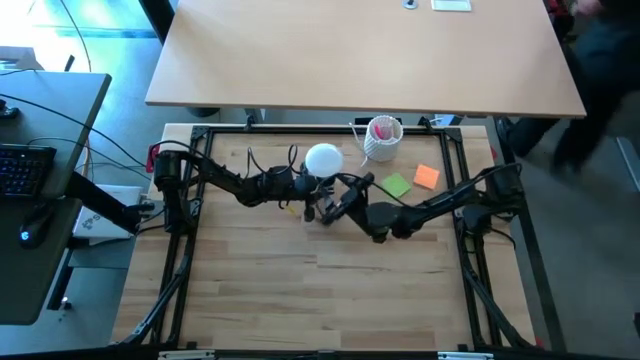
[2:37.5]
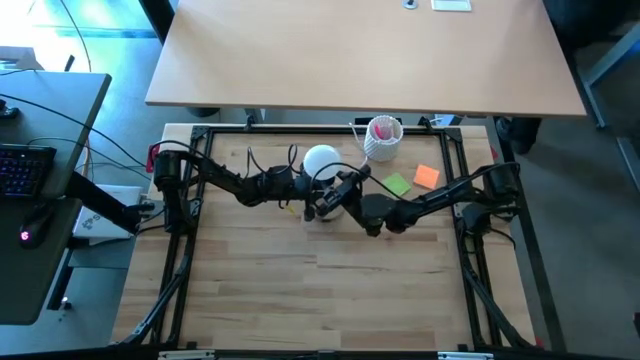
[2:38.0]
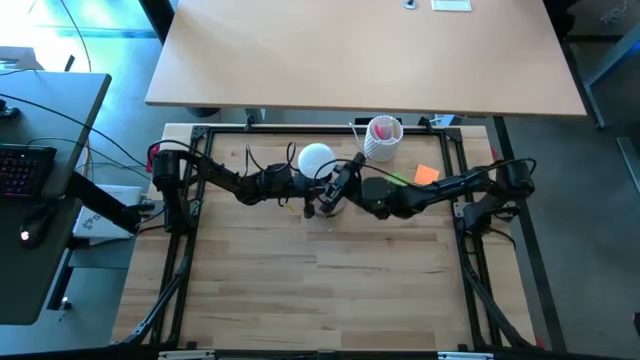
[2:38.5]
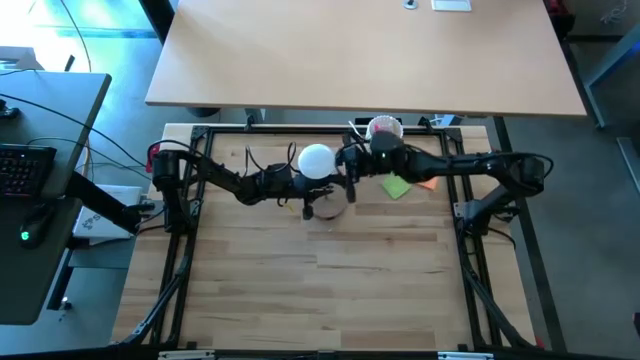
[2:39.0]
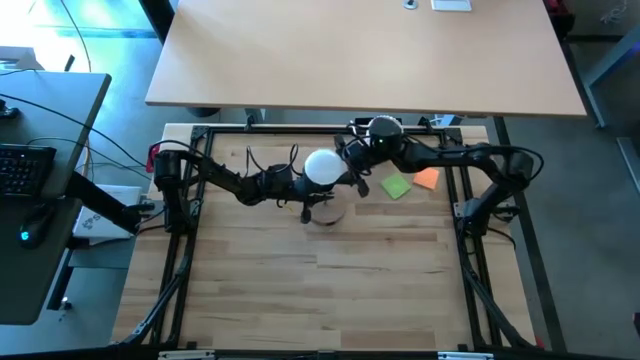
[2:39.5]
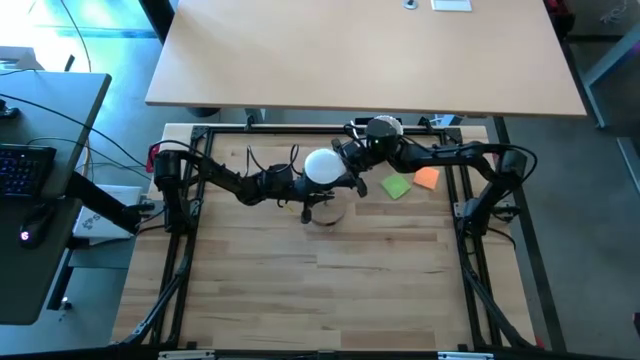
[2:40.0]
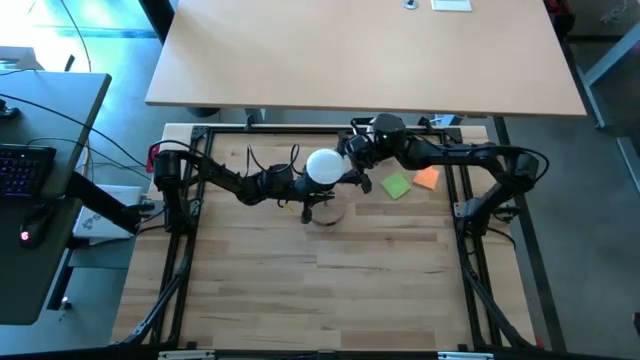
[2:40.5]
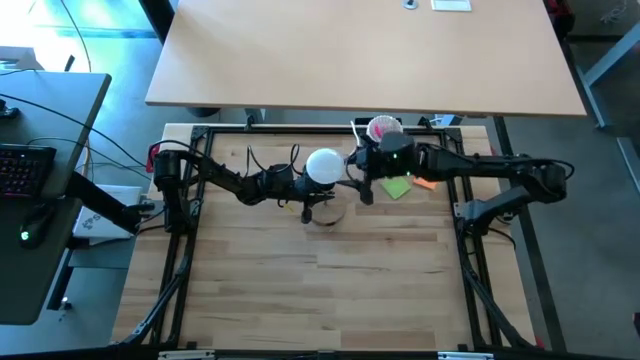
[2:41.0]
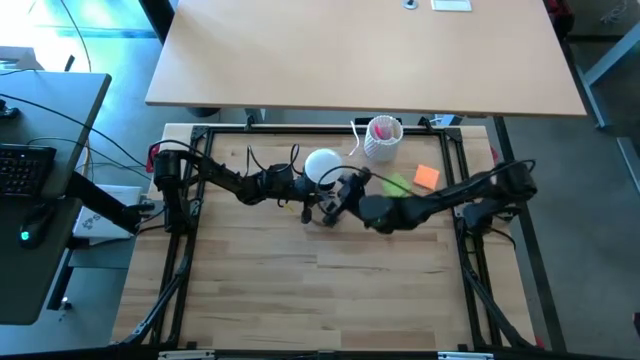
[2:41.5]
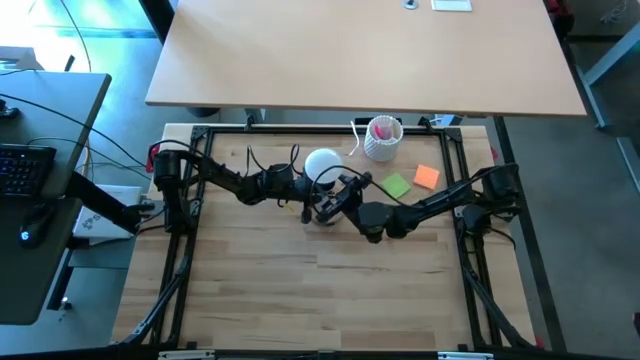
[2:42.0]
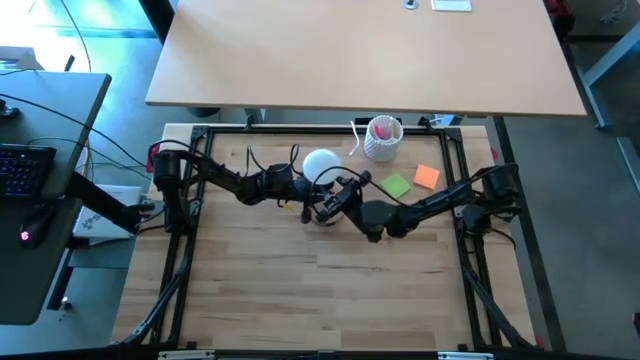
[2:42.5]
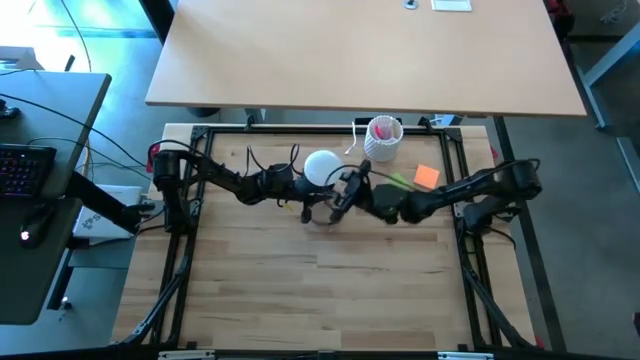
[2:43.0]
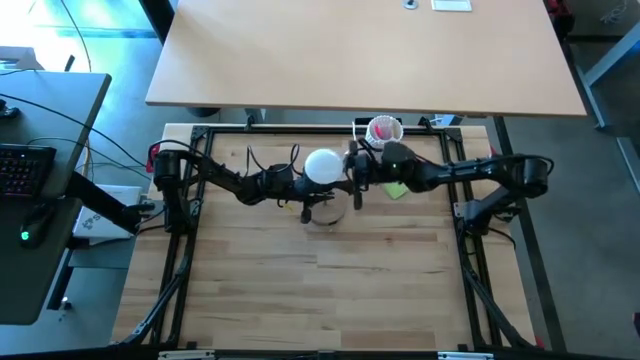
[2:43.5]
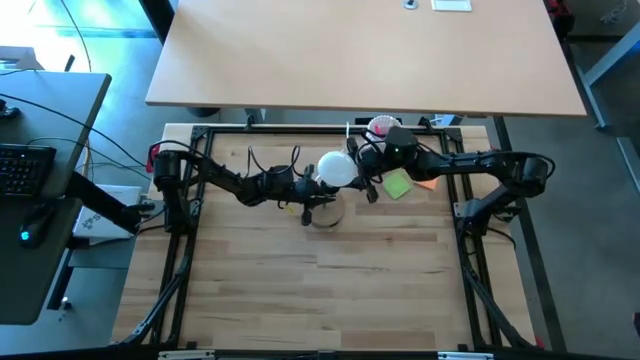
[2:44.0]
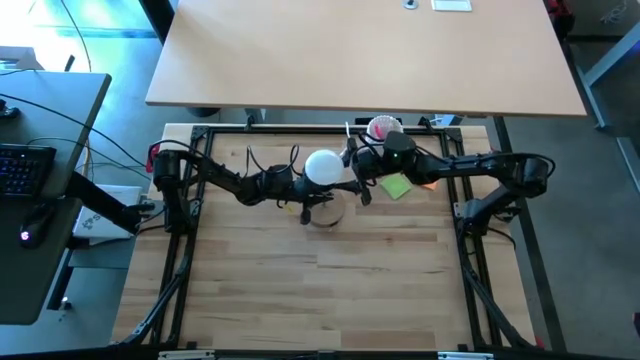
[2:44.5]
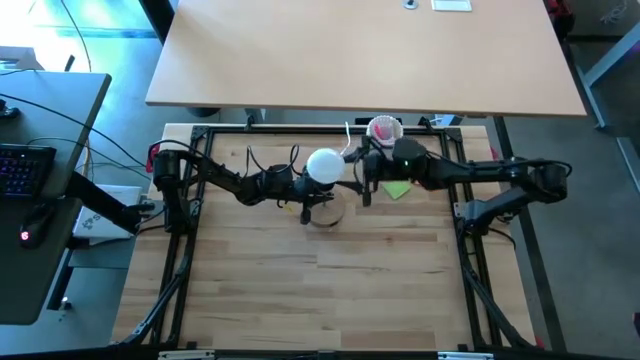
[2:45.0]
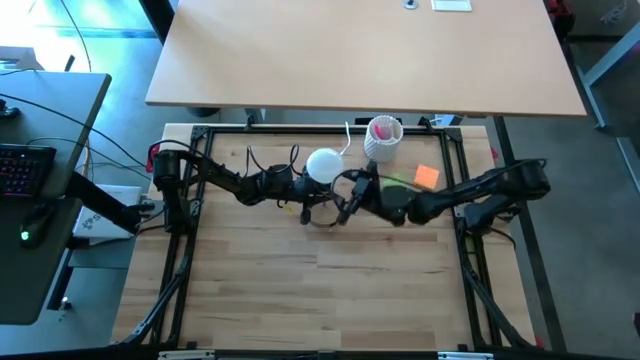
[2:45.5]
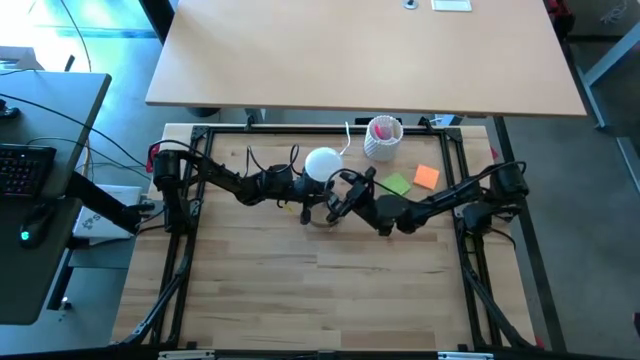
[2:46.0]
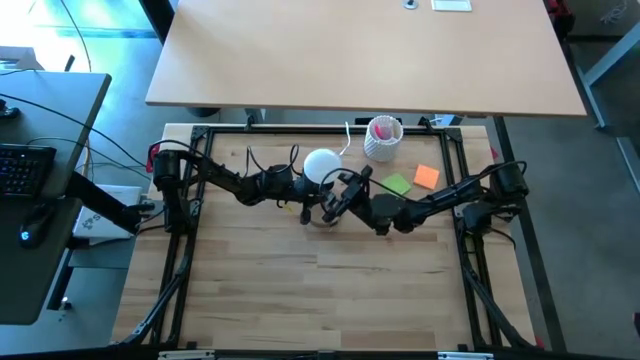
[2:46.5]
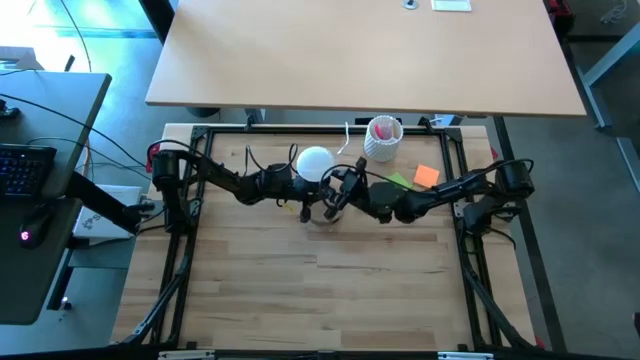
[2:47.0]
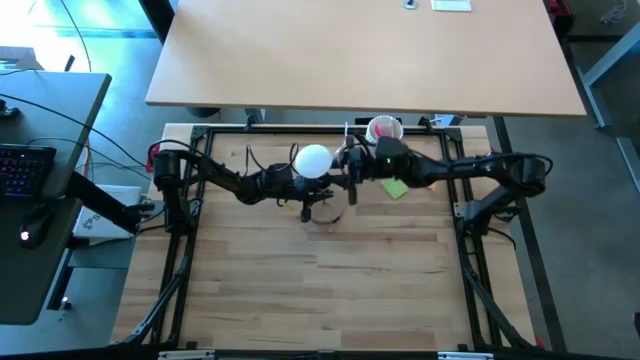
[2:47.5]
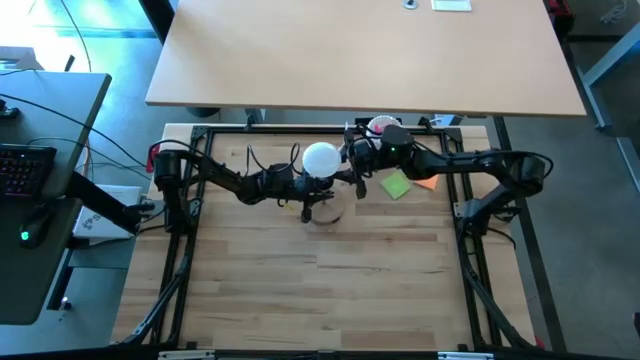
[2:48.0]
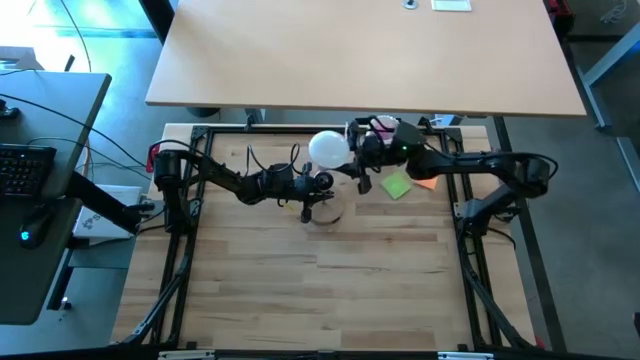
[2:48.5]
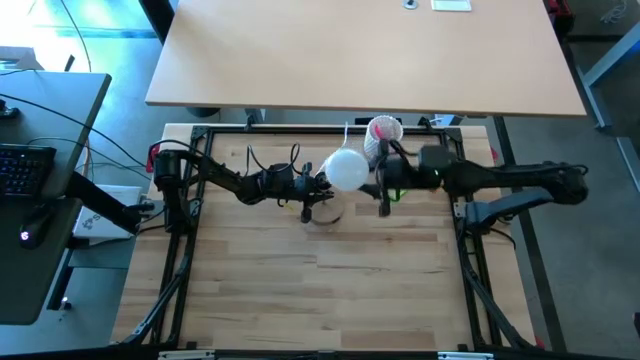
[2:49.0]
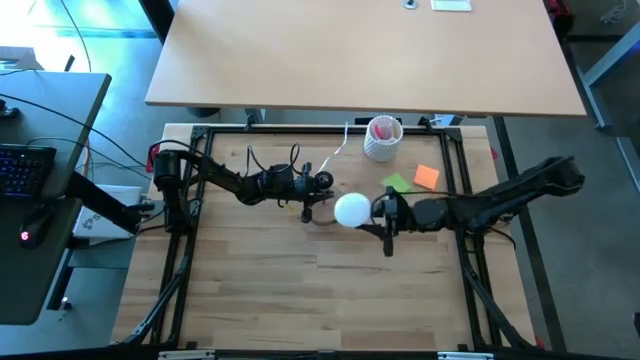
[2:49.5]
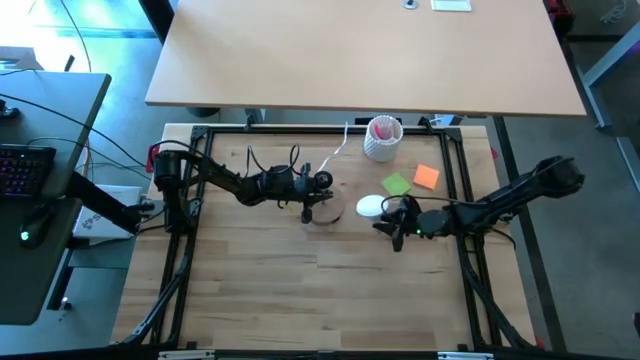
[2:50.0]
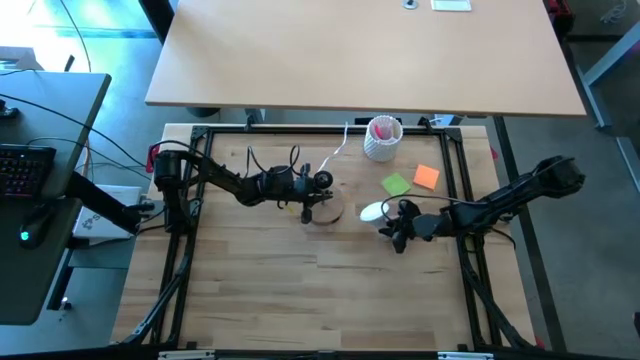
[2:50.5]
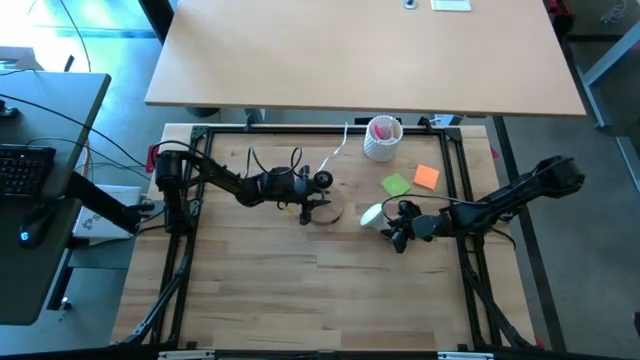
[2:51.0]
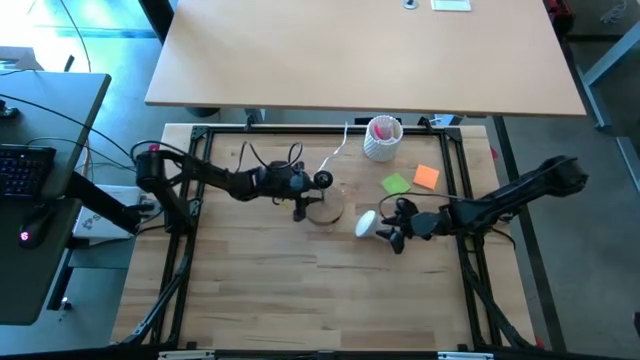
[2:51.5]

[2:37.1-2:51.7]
Task: Screw lightbulb
Remove the lightbulb from the lamp socket

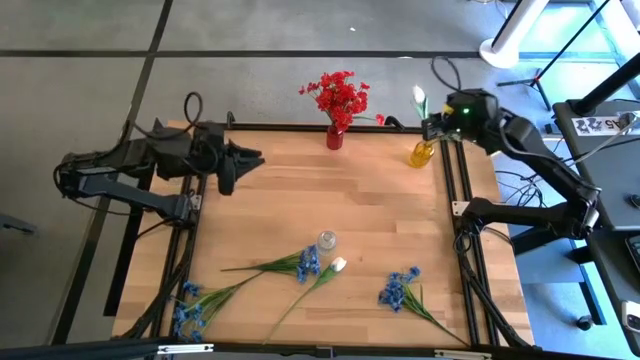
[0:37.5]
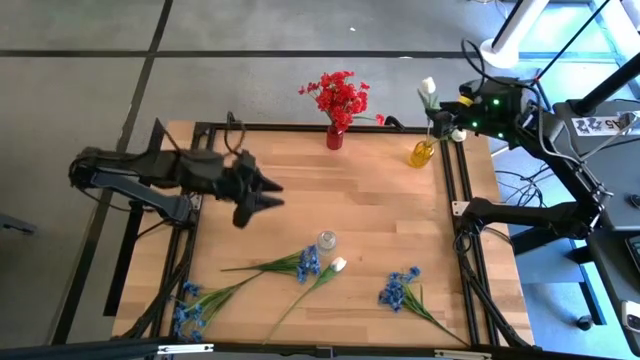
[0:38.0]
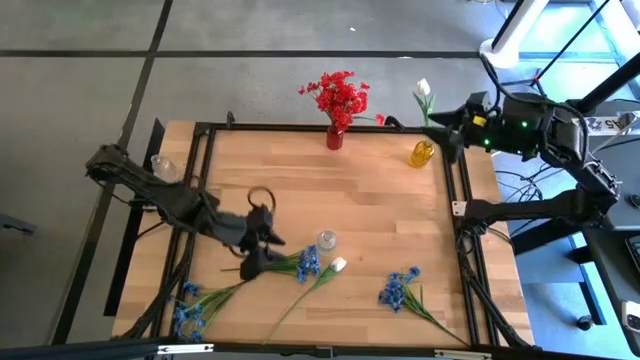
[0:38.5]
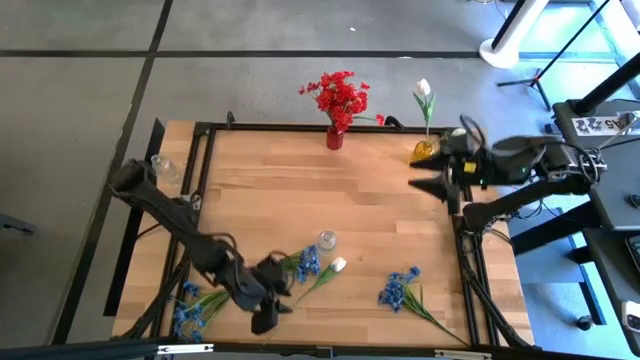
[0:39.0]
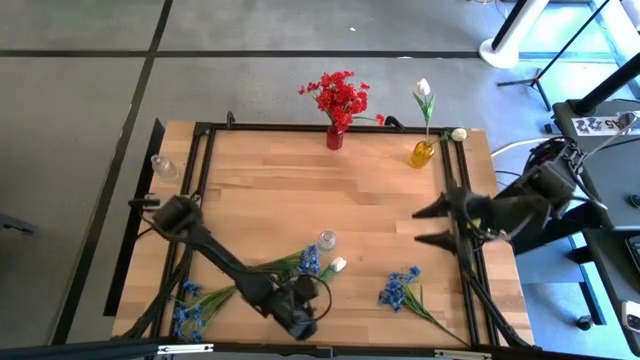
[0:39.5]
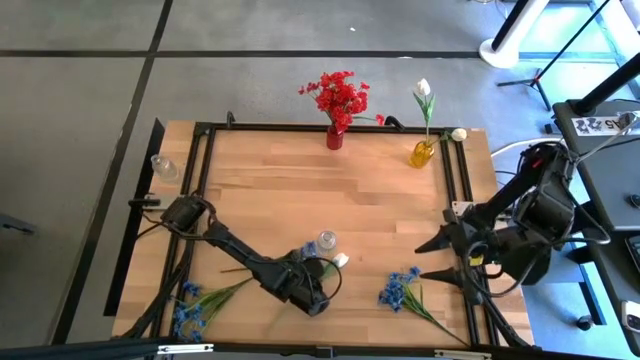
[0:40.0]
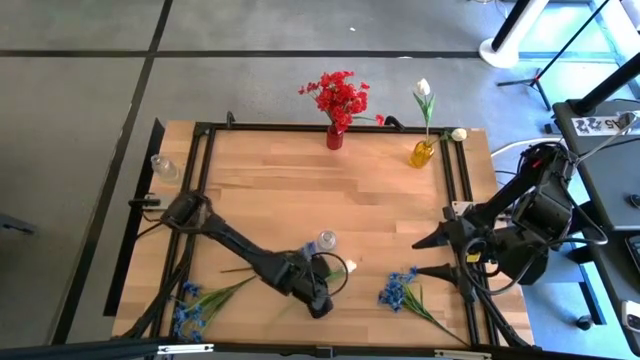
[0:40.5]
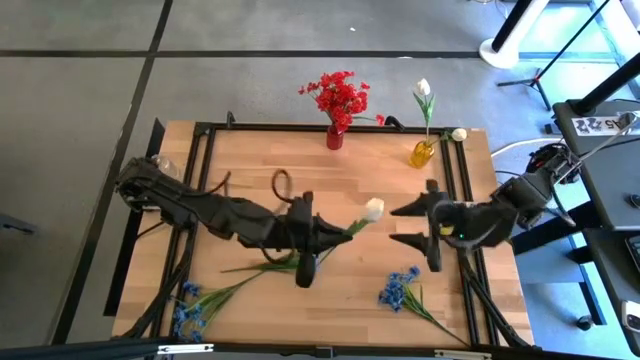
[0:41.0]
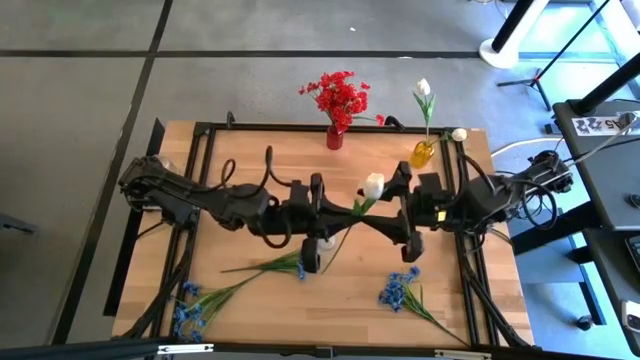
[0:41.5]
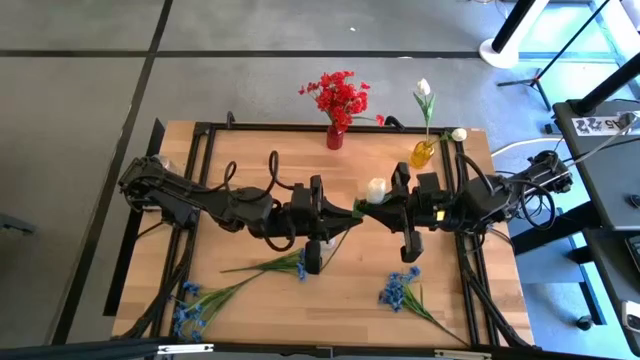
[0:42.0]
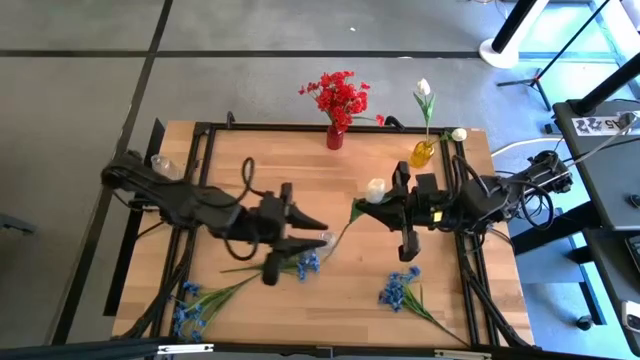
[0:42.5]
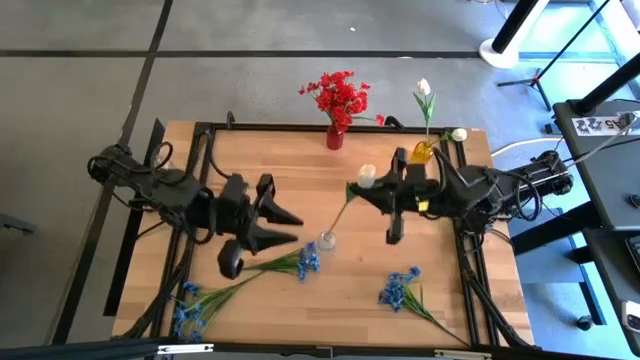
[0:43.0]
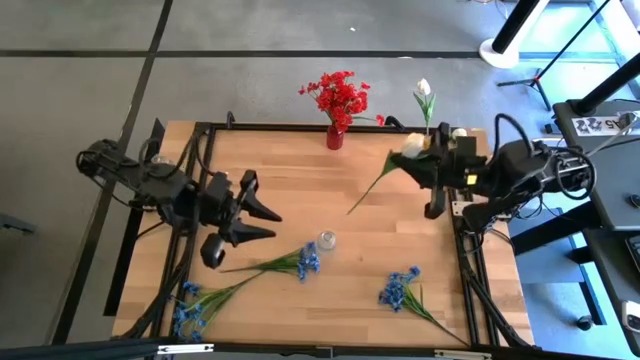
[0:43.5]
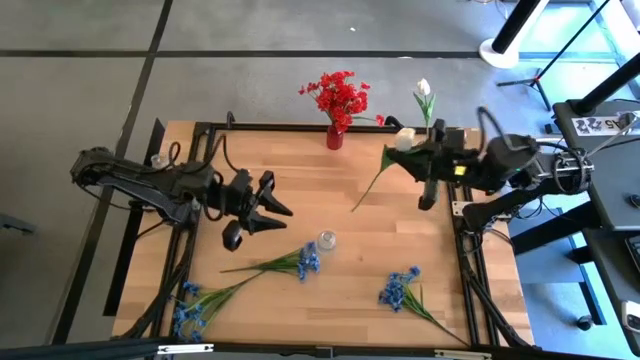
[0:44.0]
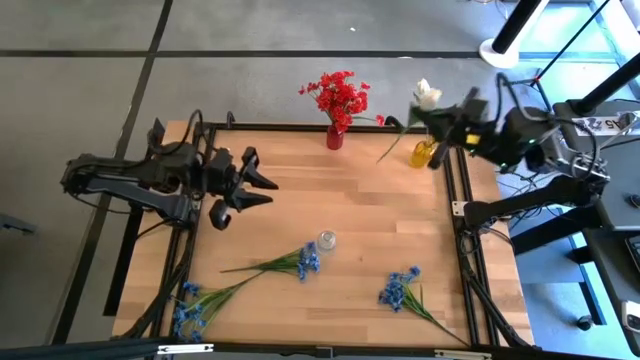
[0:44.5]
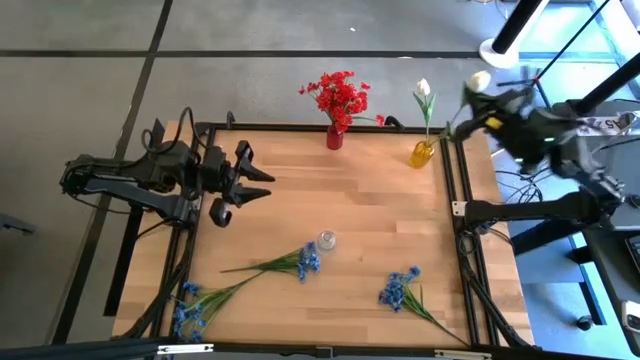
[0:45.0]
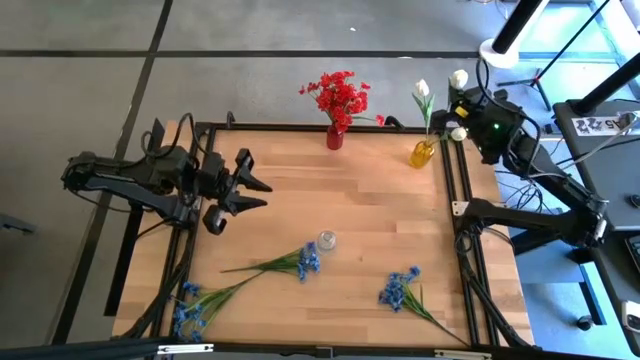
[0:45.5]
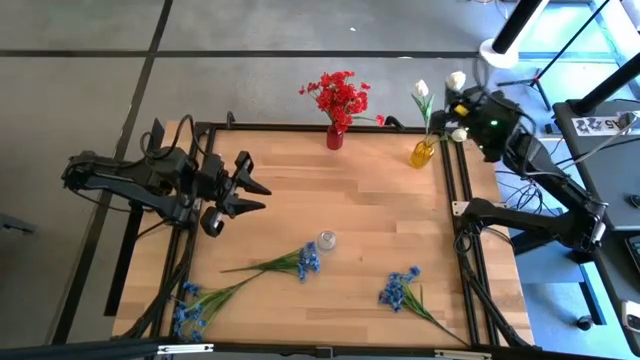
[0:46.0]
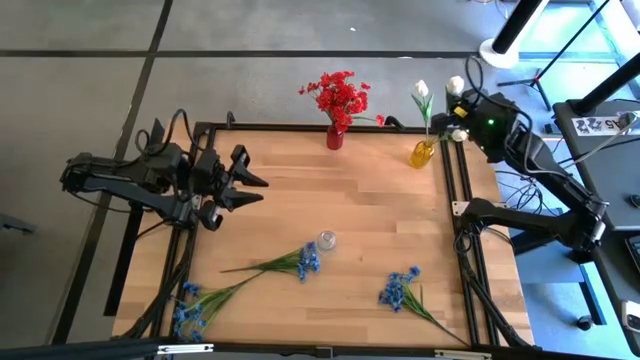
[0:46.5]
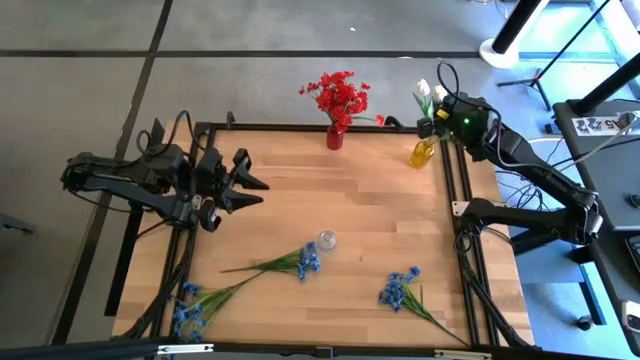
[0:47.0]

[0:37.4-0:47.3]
Task: Sort flowers into vase by color
Put the white flower into the yellow vase
